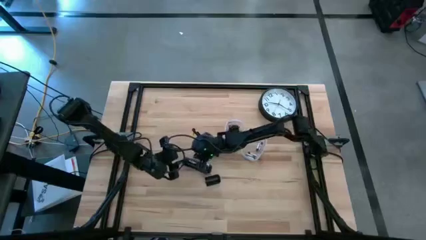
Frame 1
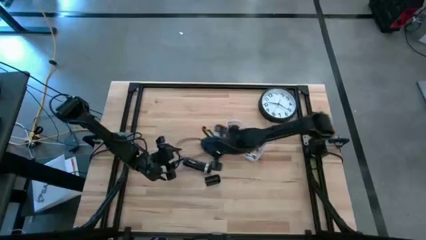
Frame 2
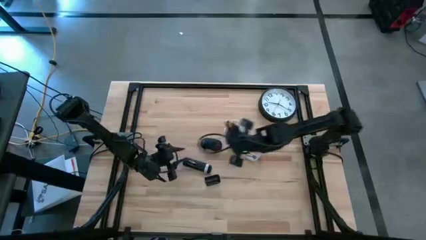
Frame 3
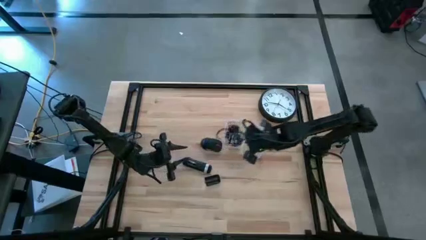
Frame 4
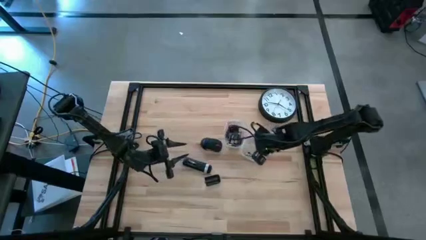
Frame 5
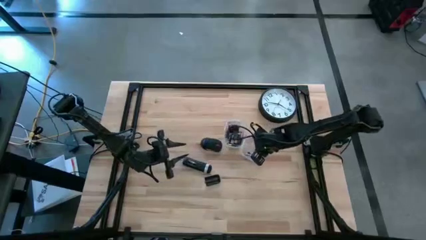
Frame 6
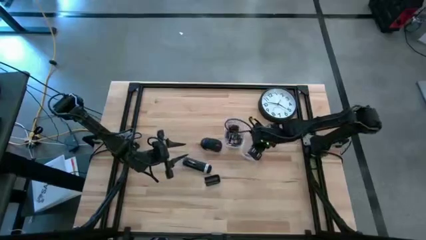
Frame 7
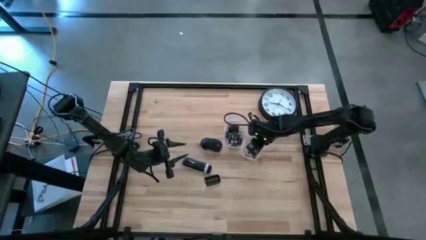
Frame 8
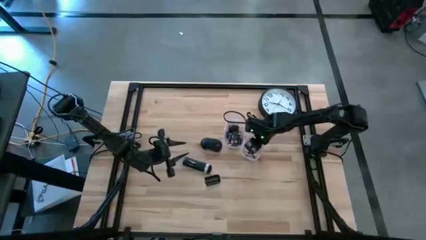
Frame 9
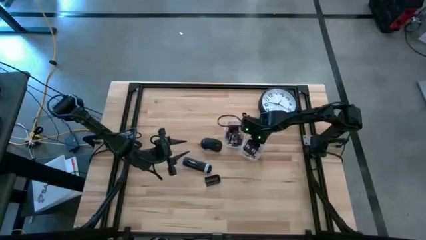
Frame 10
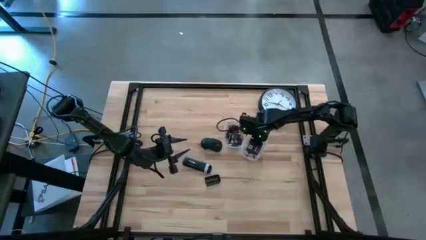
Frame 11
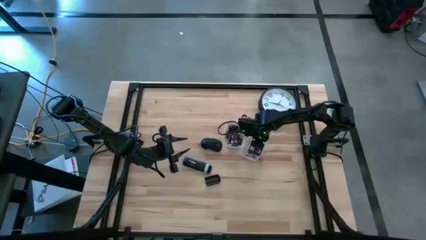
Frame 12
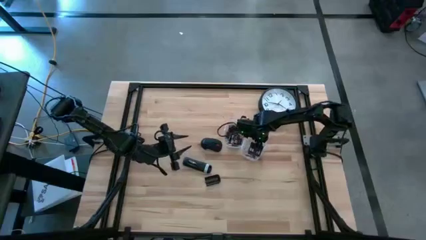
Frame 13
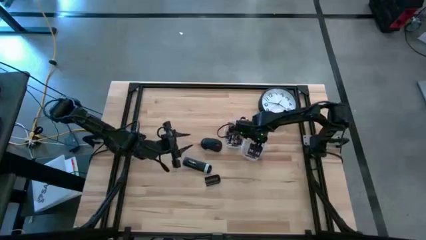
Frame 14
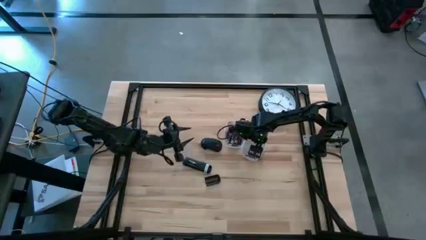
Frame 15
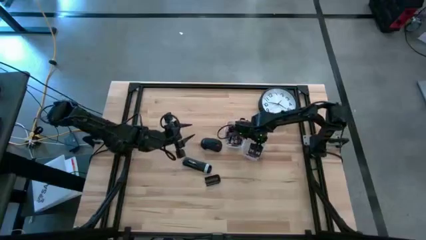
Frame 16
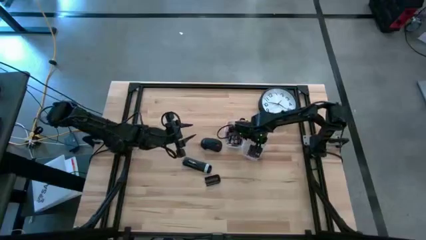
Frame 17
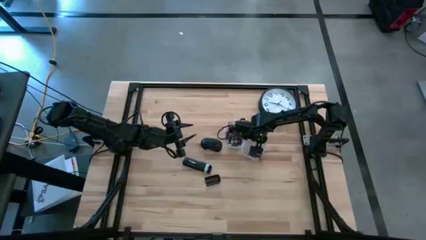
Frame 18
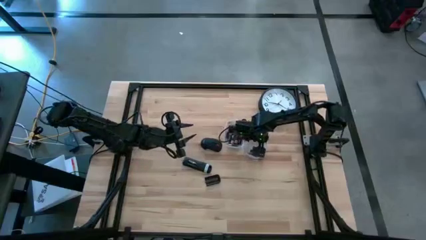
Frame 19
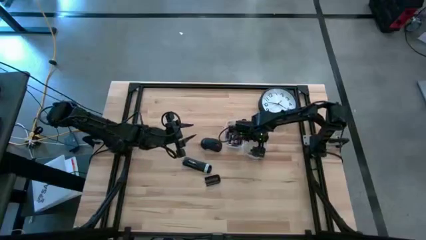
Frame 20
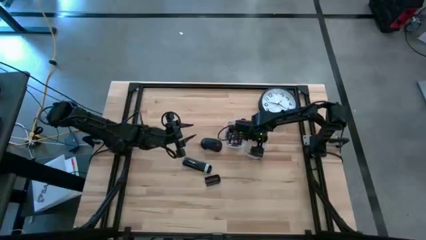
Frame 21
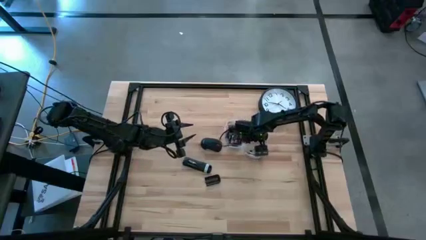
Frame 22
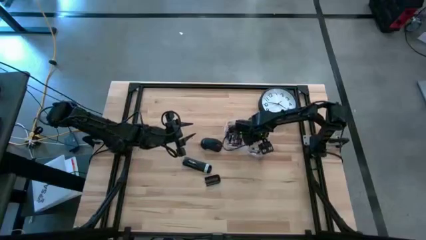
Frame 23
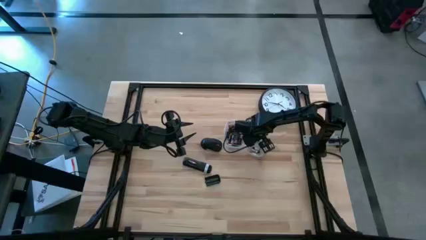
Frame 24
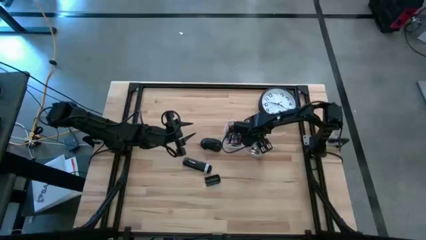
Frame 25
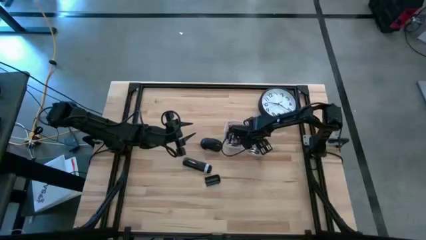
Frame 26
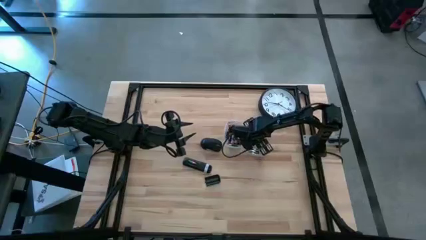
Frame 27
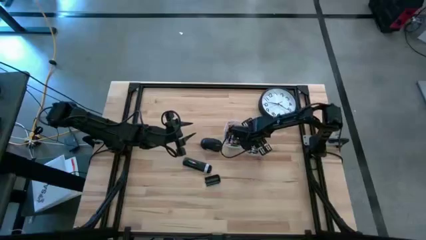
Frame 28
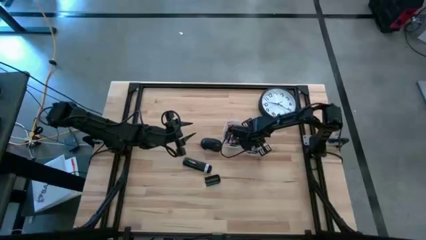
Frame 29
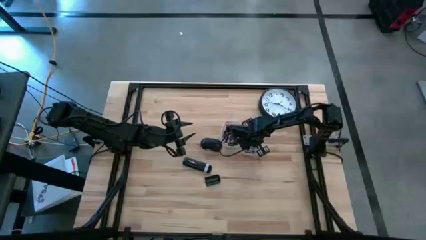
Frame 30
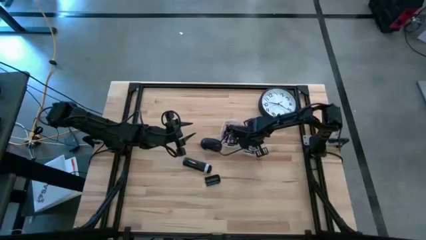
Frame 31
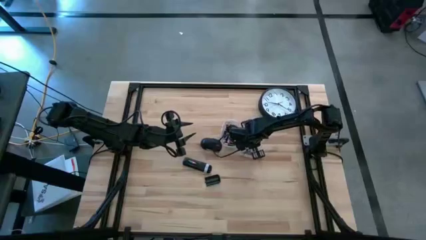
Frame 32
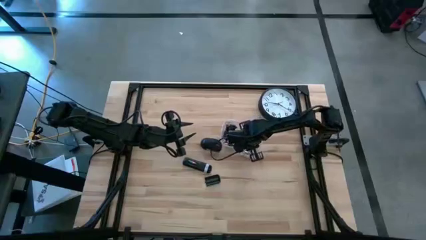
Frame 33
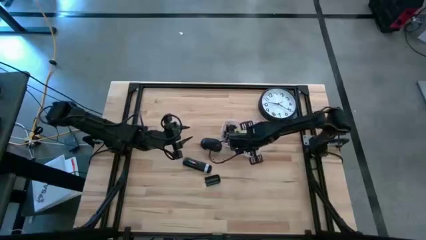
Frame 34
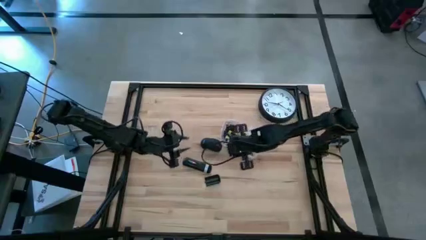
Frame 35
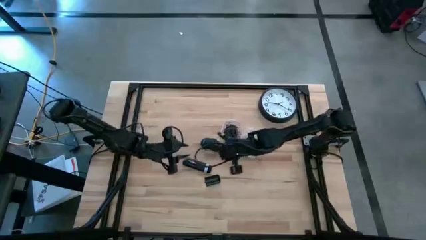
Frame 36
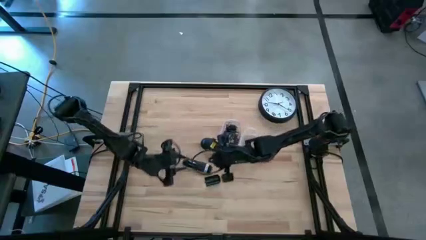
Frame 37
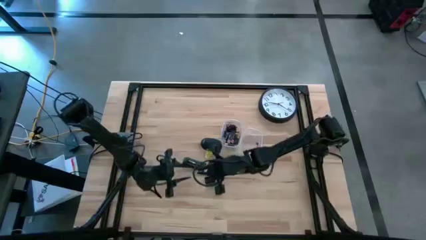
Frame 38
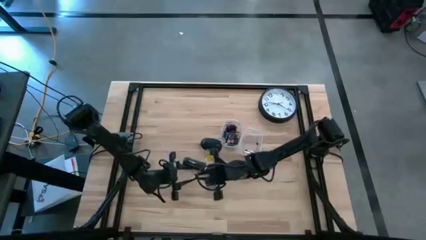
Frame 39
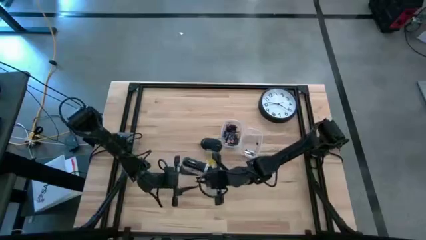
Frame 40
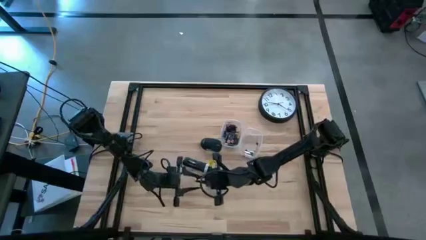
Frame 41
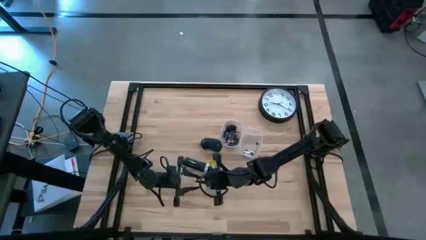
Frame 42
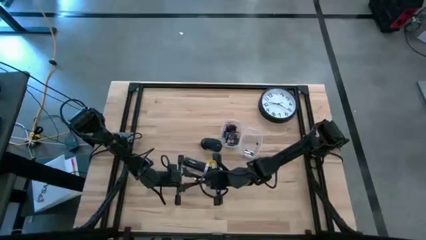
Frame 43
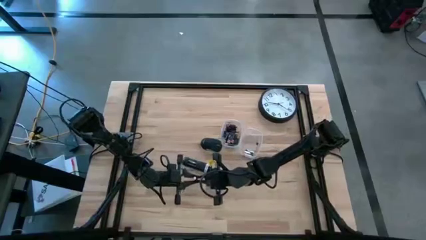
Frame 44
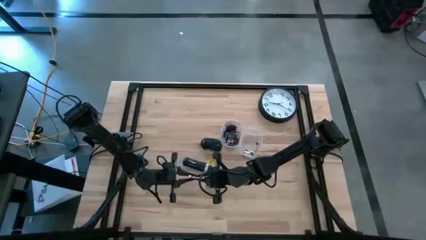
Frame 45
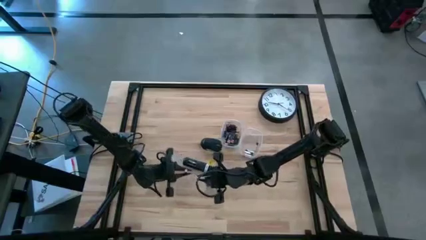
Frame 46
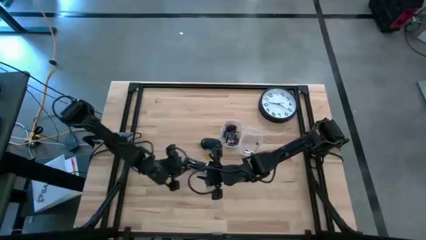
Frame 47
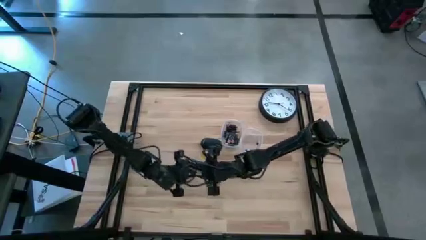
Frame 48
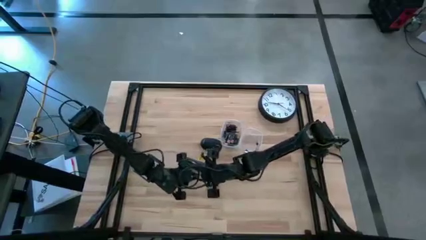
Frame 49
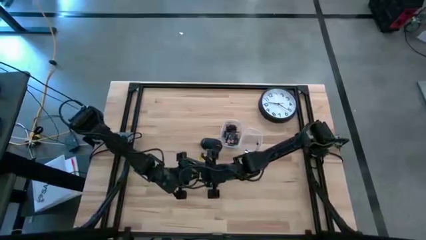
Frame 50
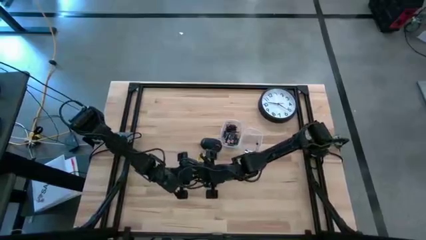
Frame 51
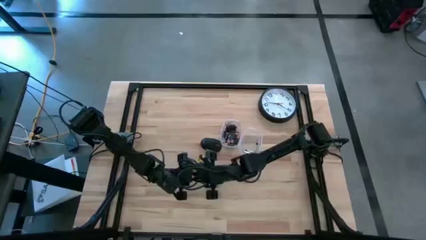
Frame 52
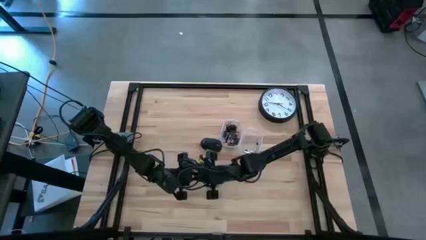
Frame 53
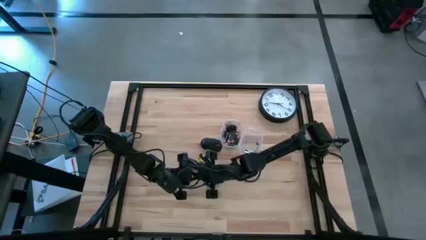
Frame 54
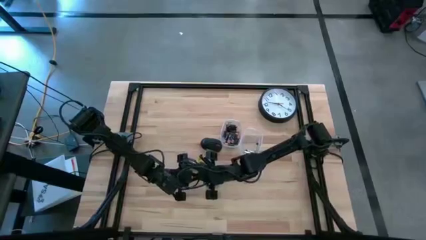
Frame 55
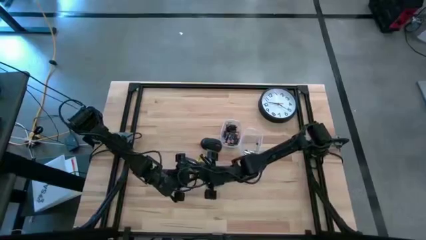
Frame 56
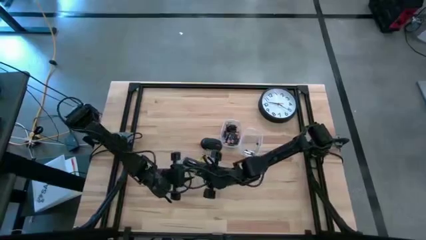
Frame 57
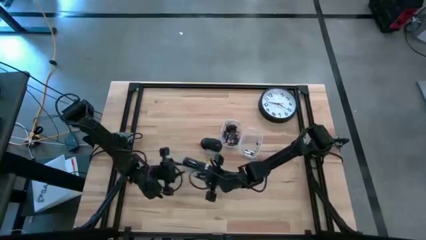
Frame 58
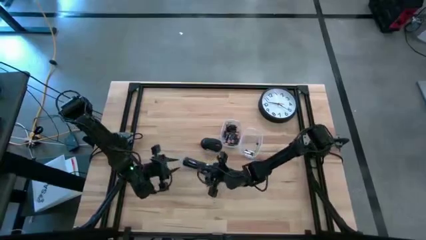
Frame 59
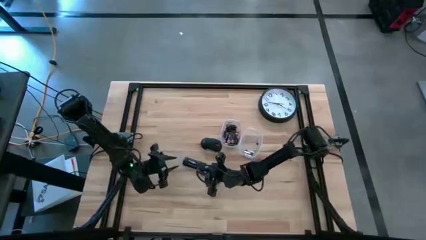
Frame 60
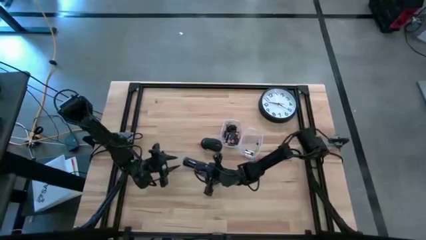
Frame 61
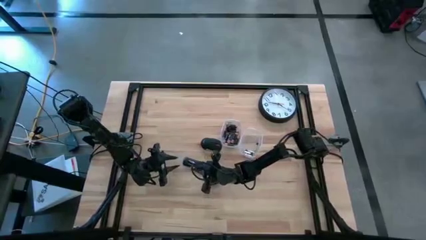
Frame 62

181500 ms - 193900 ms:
Task: Insert battery
Insert the silver battery into the remote battery compartment

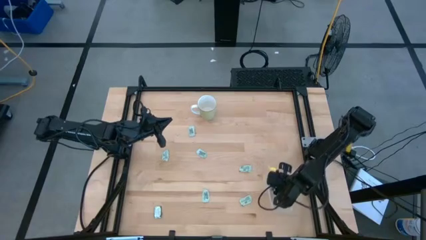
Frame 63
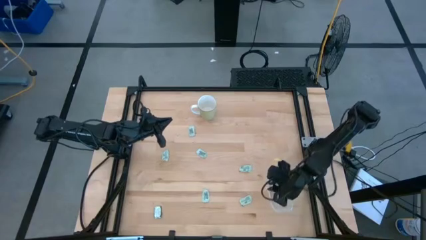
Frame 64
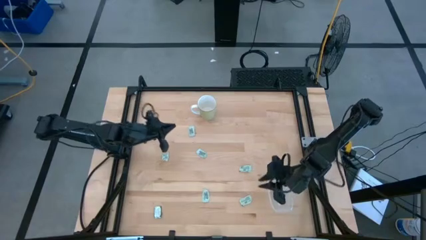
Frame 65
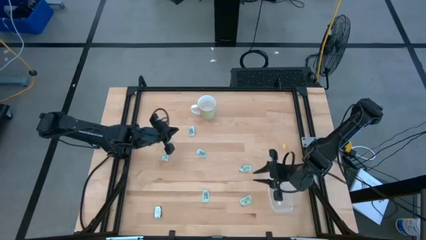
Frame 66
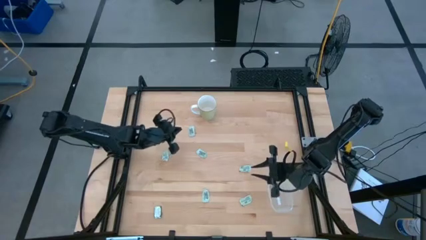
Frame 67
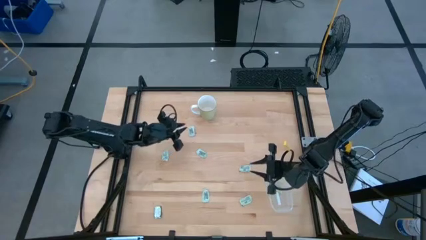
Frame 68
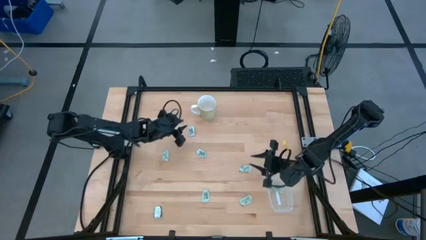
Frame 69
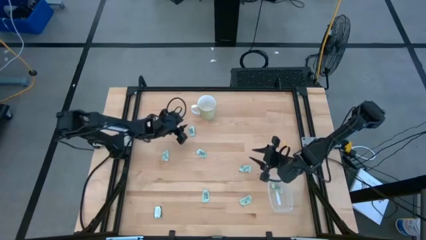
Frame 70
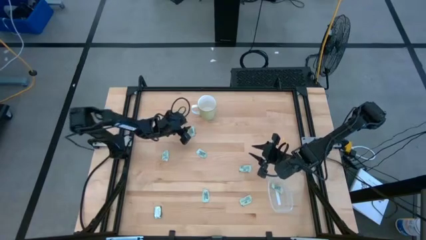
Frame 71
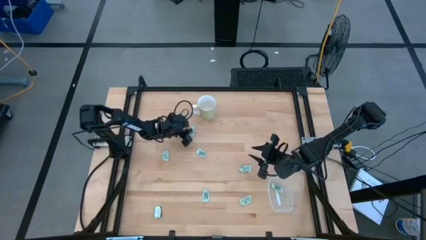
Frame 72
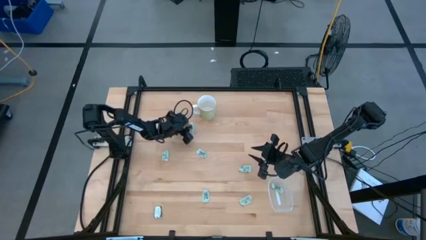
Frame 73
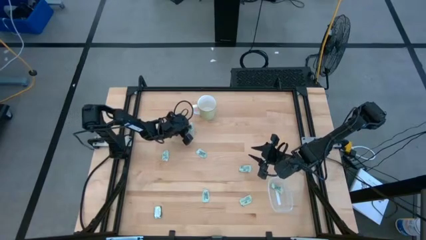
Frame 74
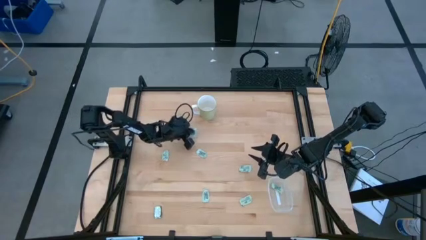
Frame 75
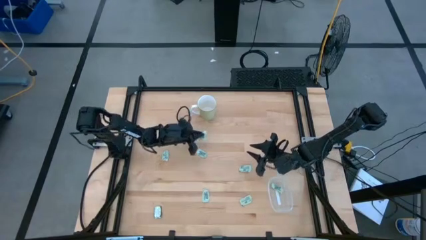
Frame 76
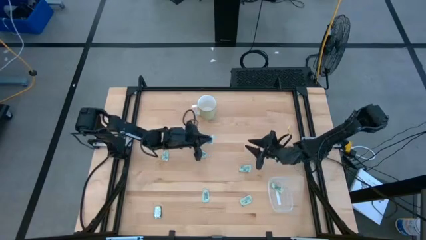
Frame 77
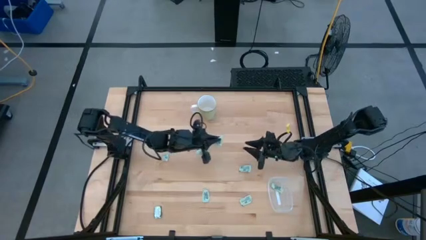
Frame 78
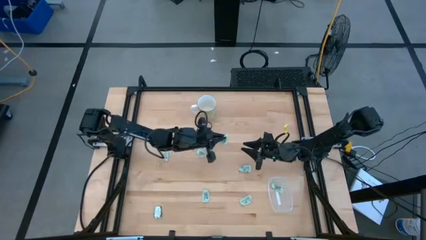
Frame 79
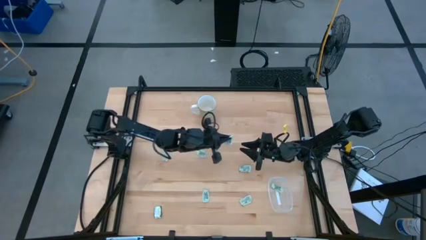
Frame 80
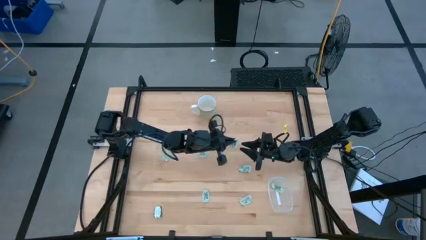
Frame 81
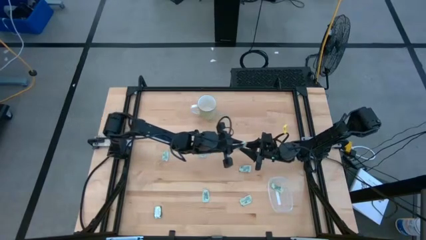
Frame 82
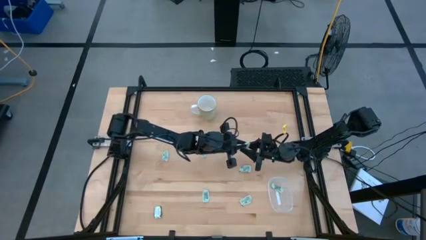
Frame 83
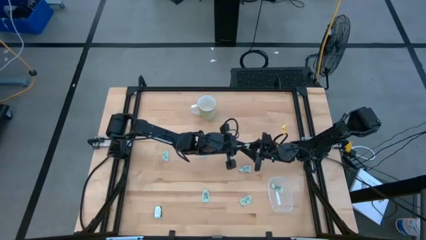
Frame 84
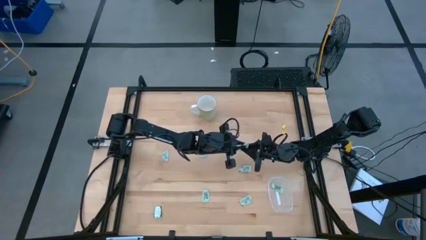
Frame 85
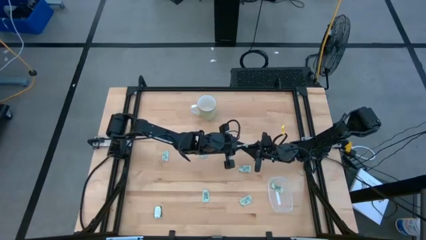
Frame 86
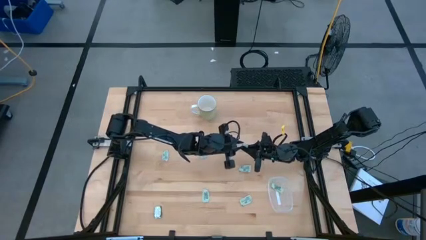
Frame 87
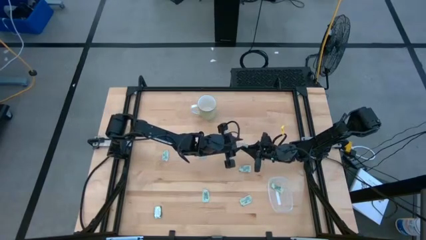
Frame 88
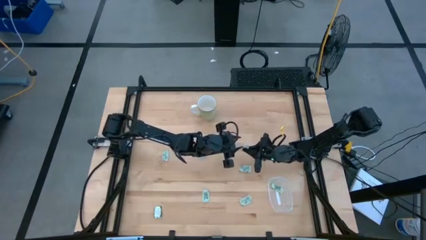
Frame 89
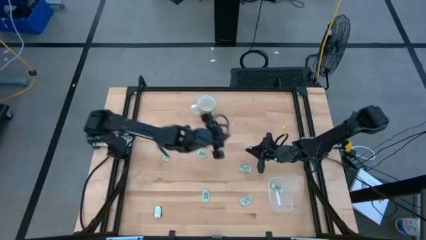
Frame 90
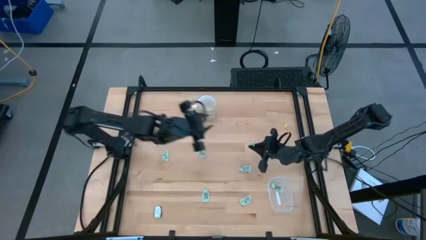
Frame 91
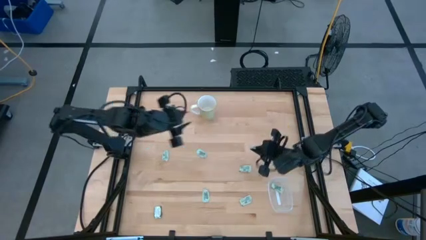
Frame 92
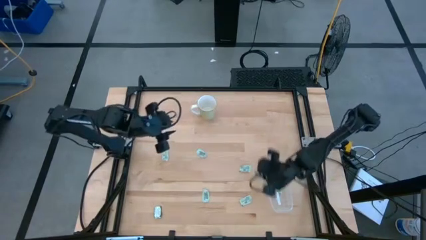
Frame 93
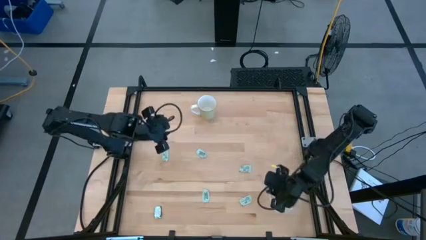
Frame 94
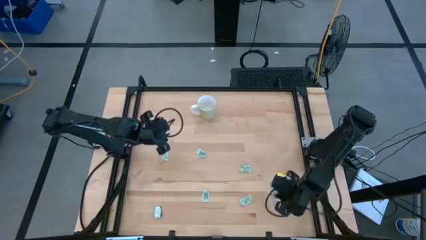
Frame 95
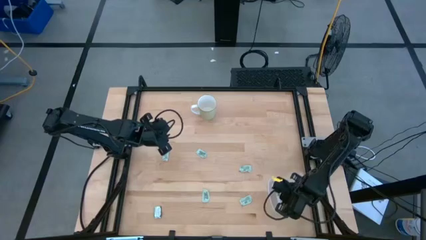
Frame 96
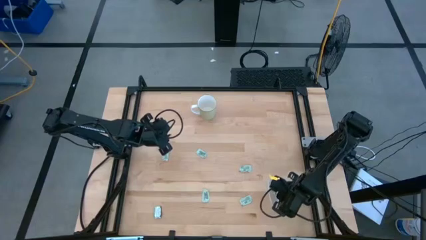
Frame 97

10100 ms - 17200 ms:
Task: Pick and place Stevia / Truvia into bins
Put the stevia packet into the transparent bin
